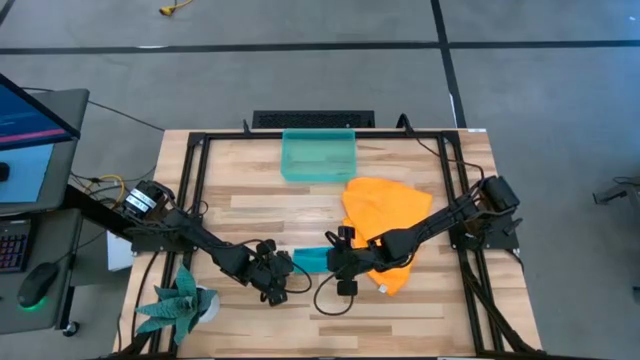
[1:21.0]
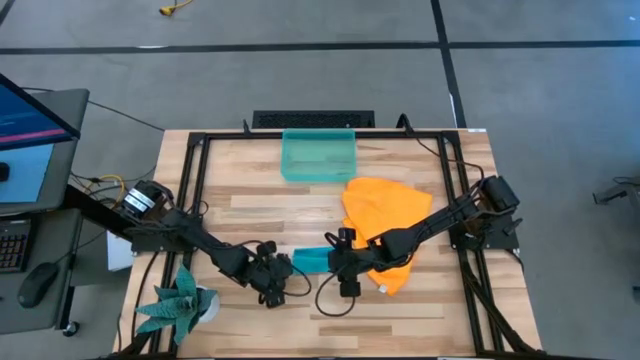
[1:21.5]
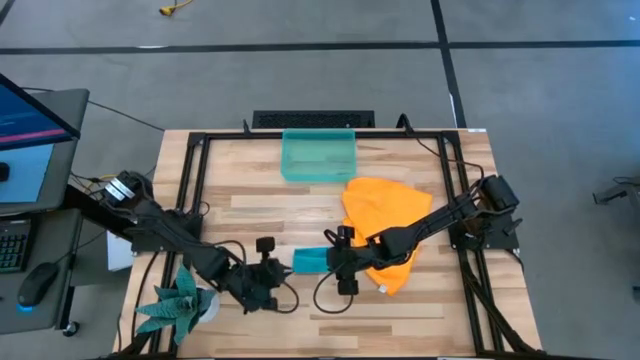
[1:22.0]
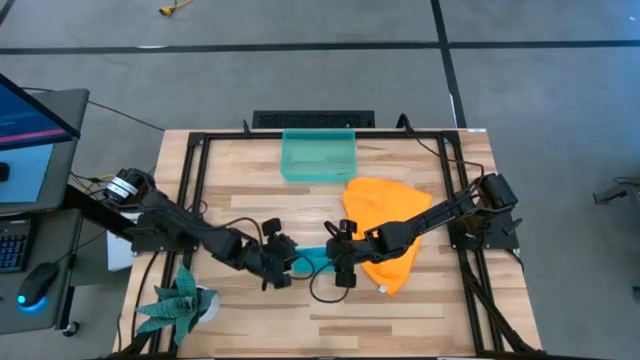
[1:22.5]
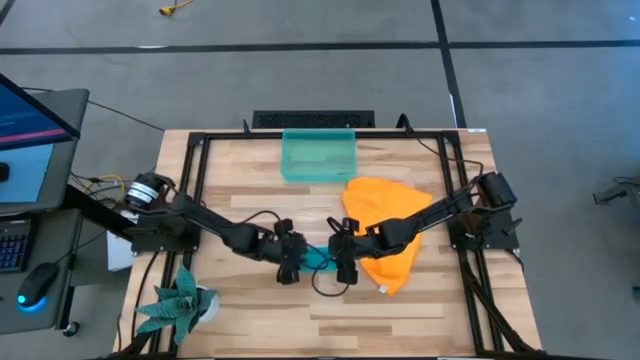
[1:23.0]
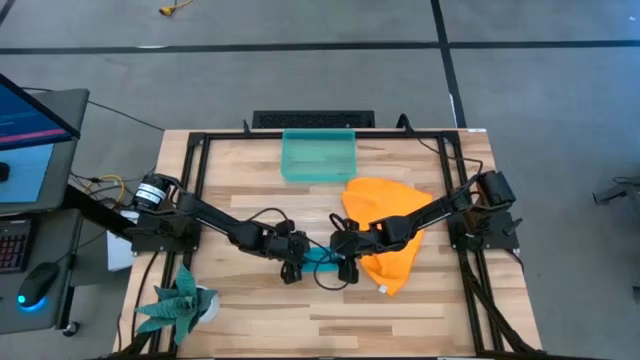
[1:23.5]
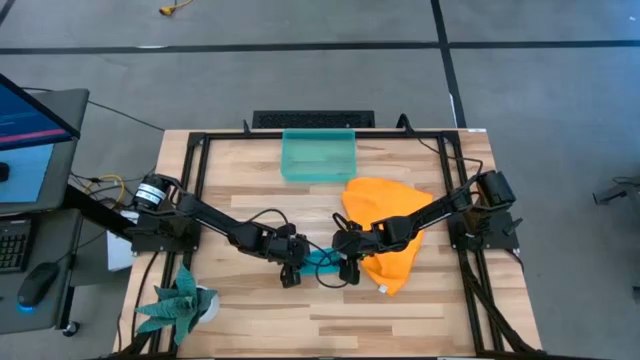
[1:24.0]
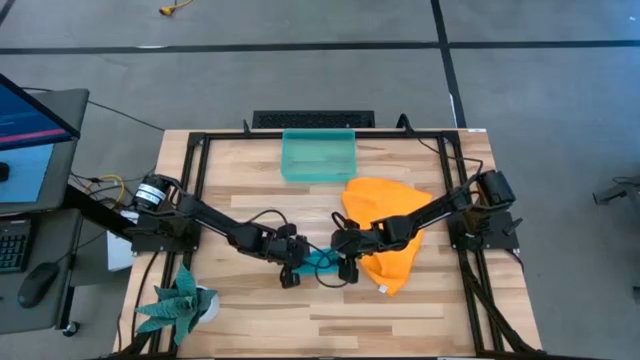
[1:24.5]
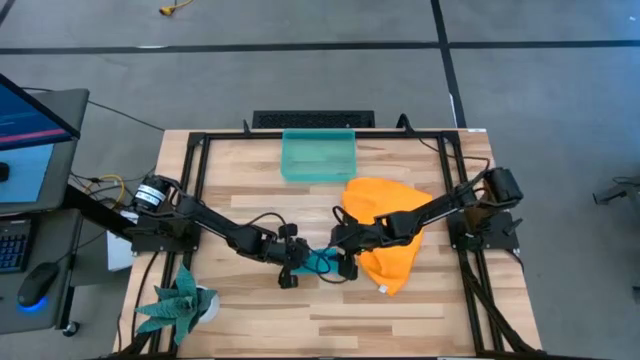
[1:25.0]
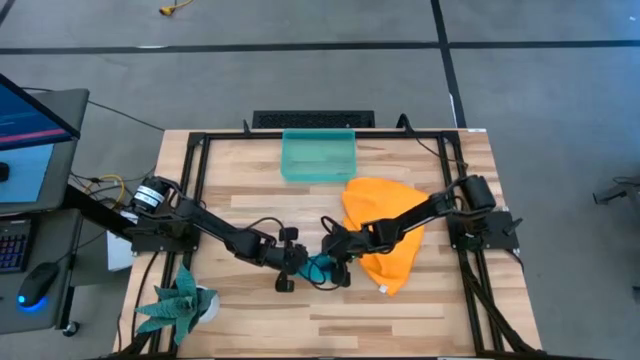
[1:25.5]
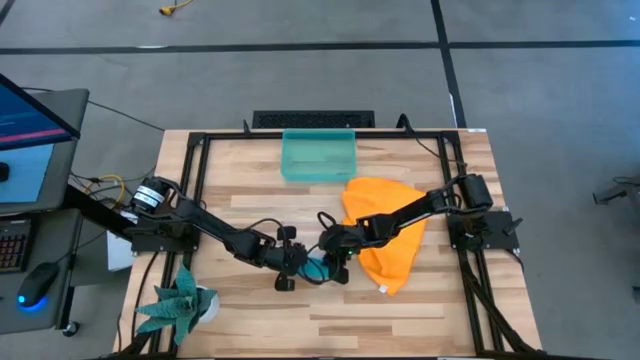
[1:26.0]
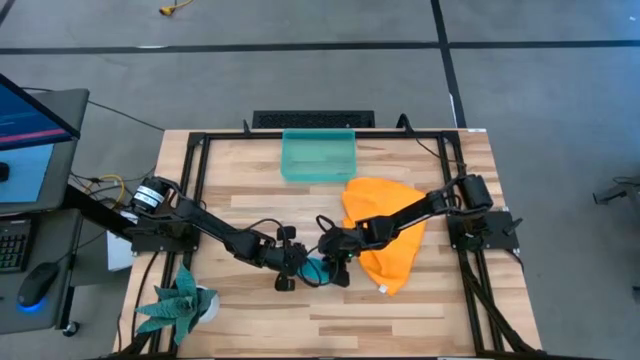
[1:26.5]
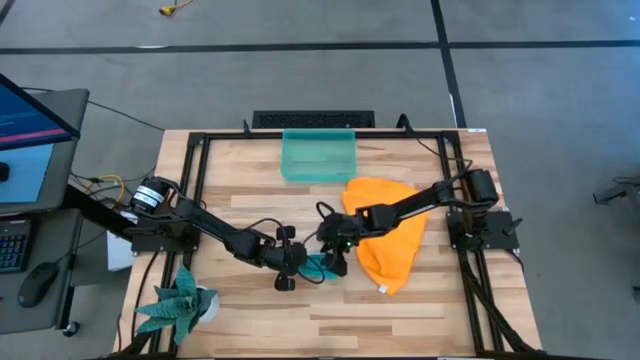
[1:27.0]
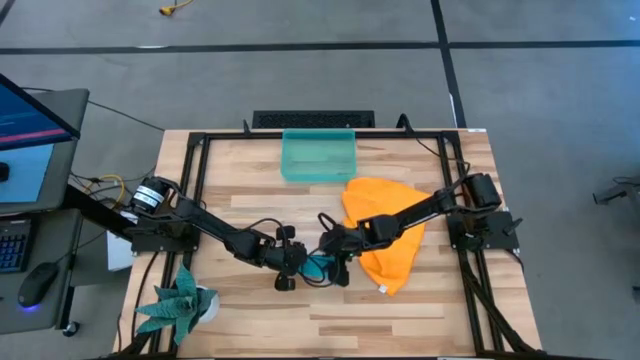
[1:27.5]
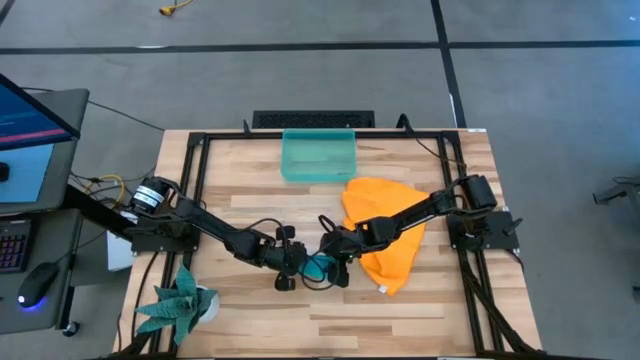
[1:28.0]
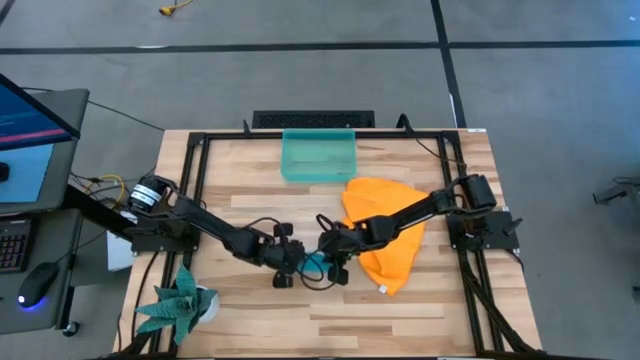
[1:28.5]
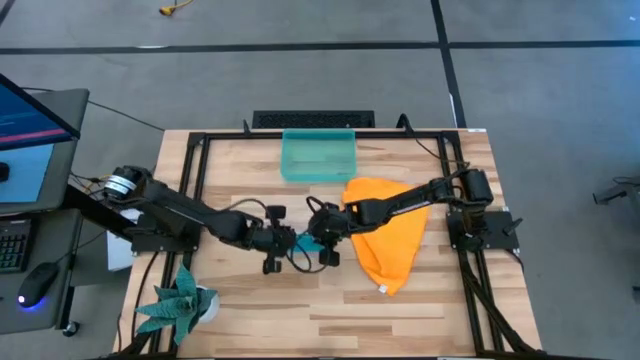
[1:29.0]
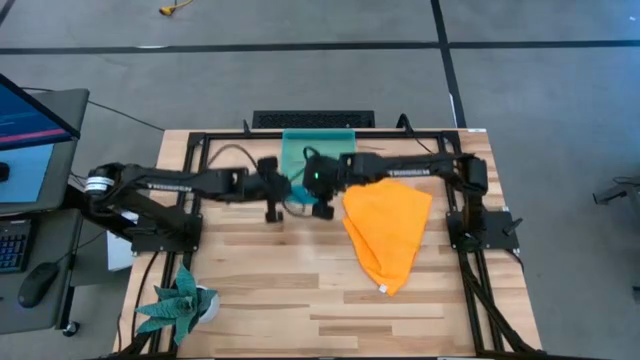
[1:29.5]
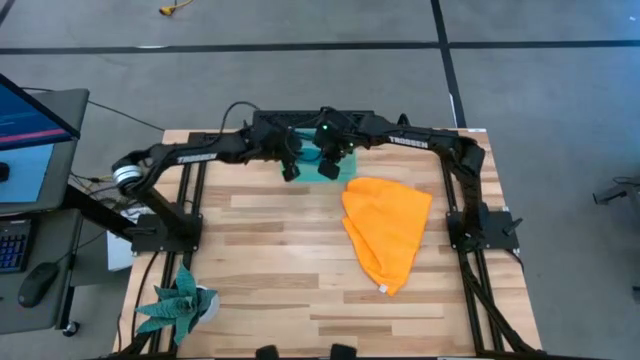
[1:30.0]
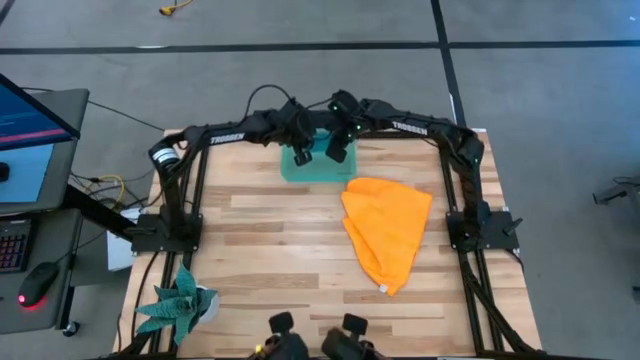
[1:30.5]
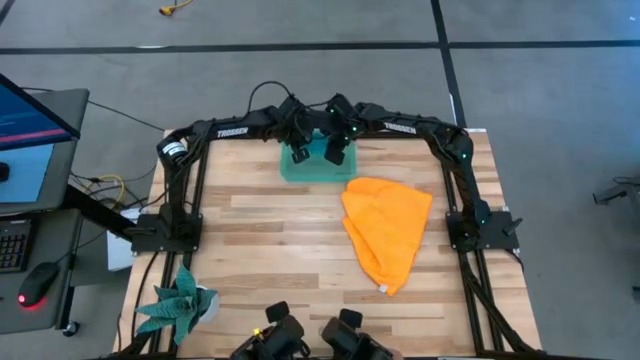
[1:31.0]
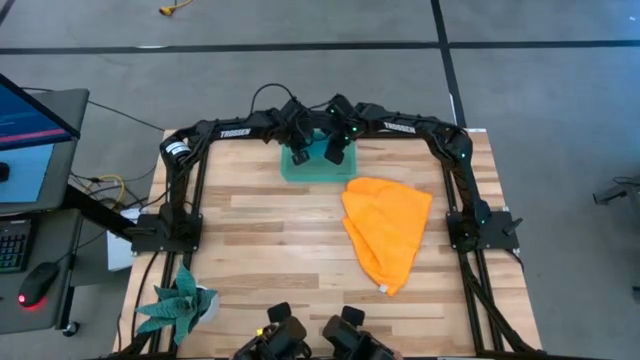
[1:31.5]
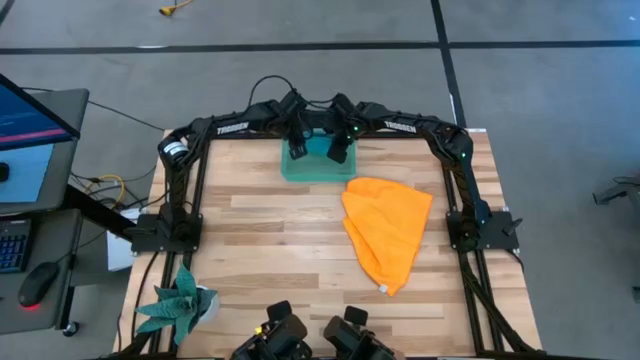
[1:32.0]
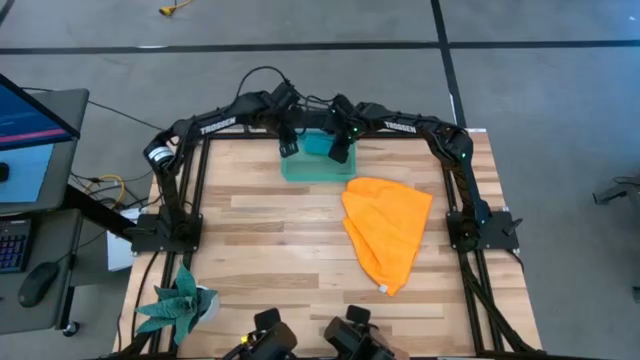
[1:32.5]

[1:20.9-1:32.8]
Task: Roll microfiber towels into tight, uniform cylinder then place into a basket
Put the rolled microfiber cloth into the blue bin

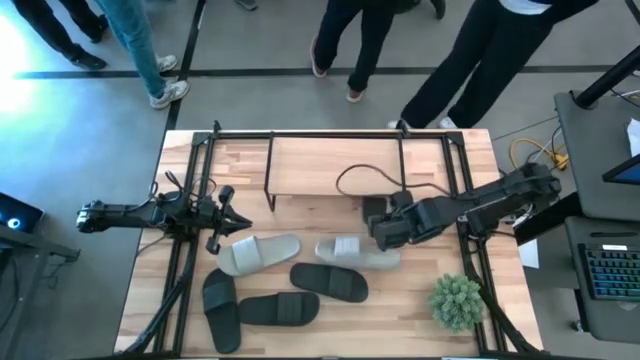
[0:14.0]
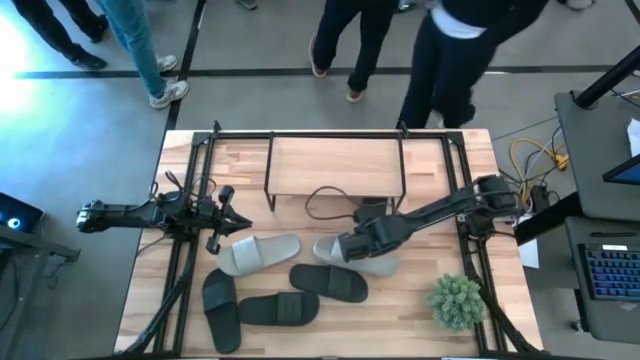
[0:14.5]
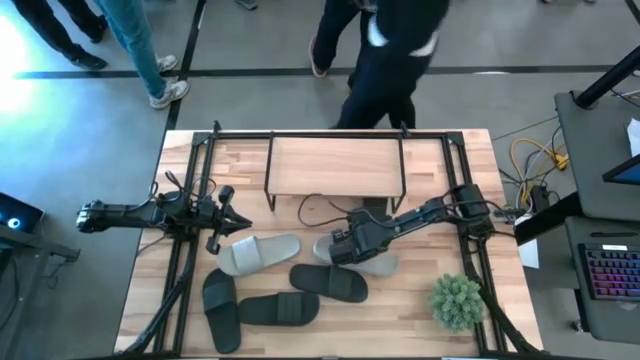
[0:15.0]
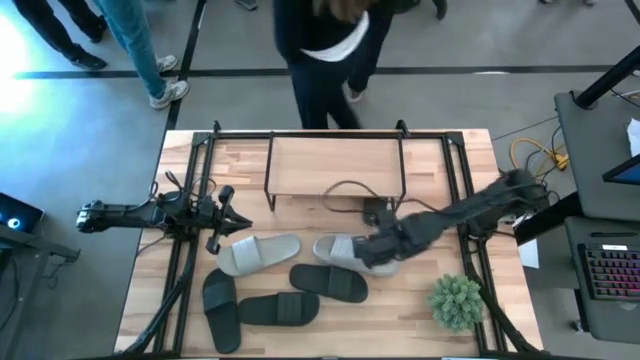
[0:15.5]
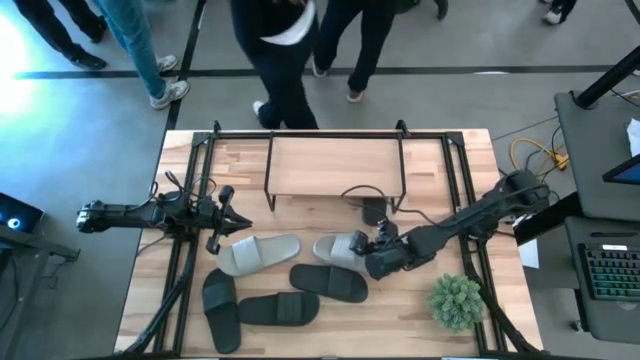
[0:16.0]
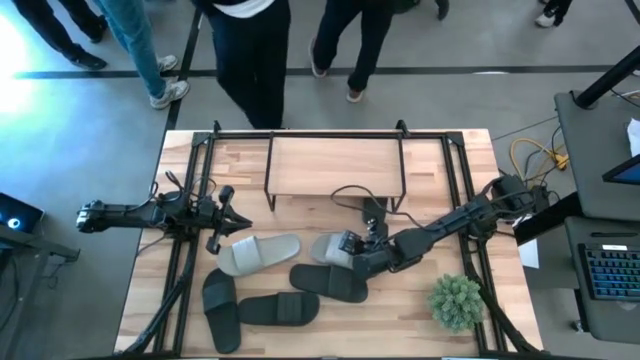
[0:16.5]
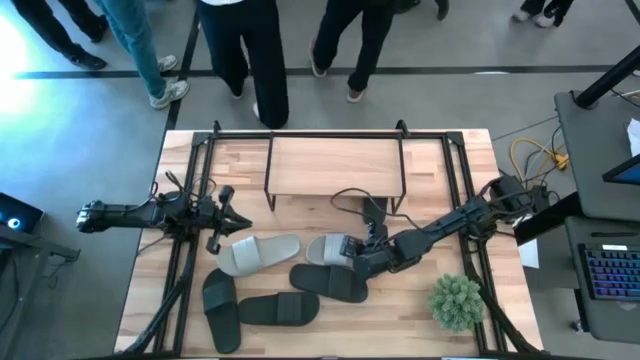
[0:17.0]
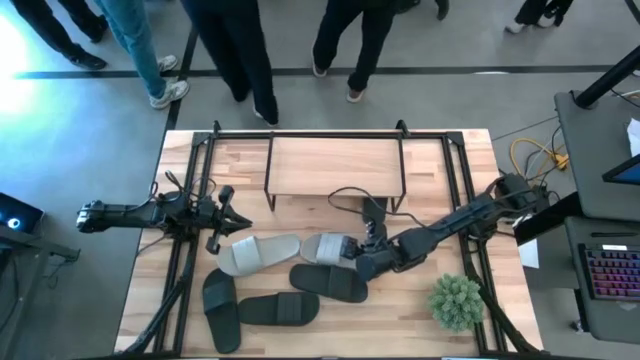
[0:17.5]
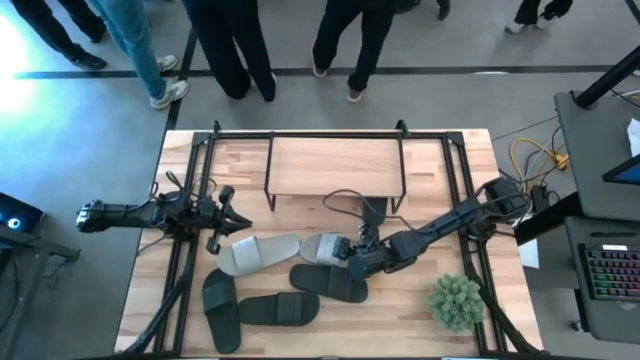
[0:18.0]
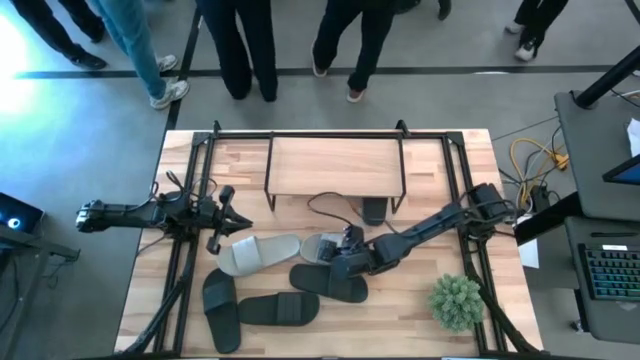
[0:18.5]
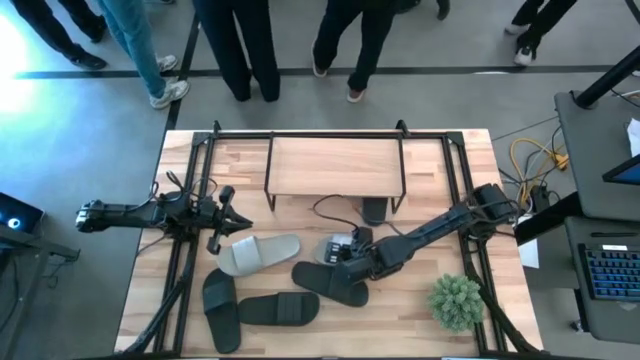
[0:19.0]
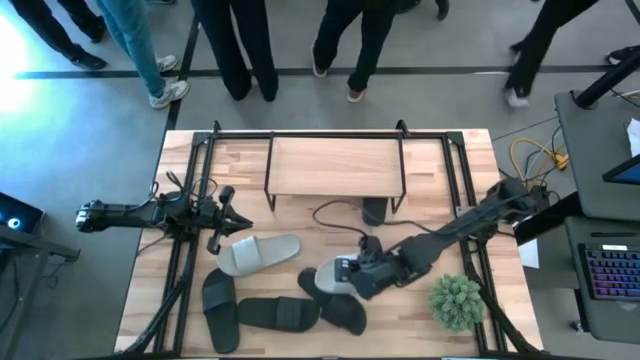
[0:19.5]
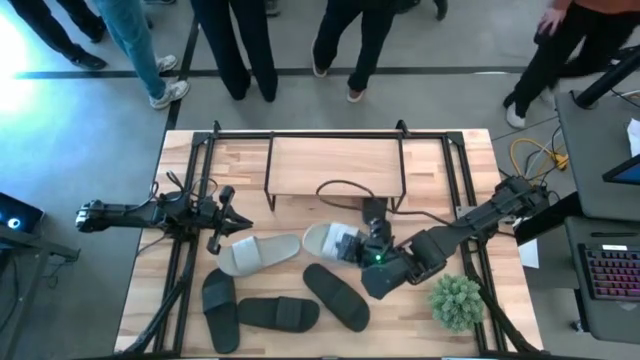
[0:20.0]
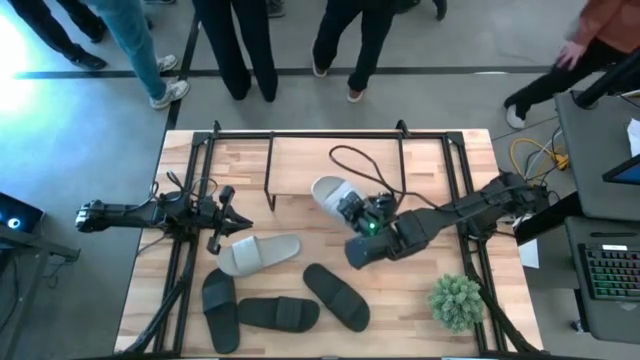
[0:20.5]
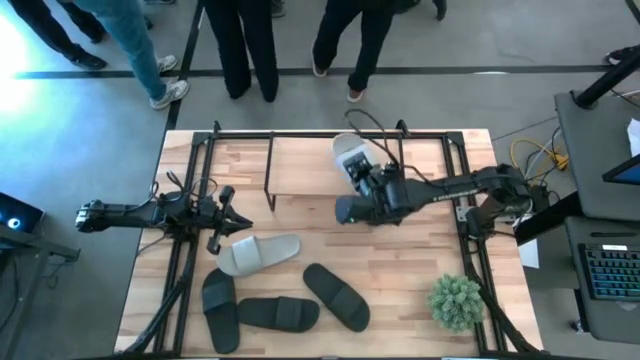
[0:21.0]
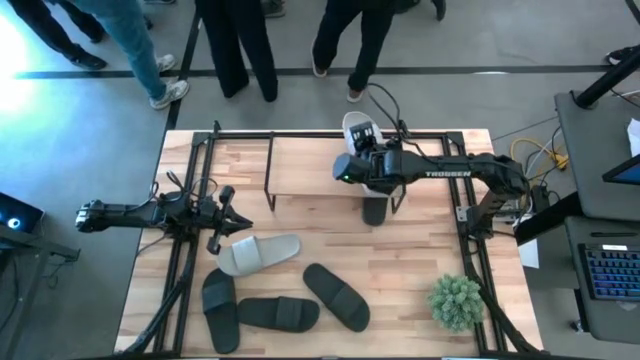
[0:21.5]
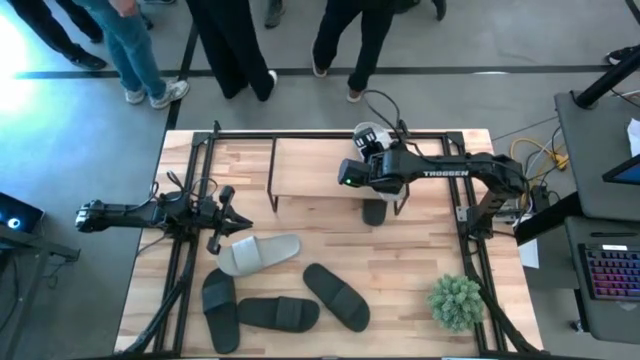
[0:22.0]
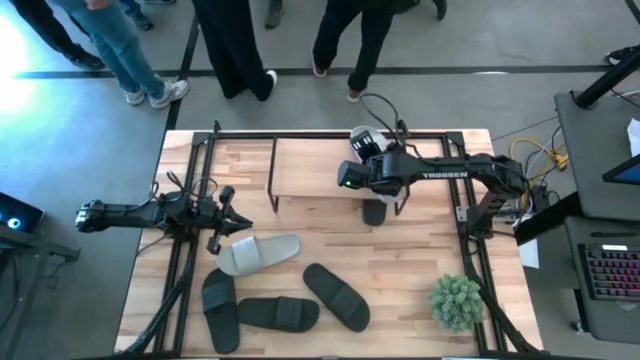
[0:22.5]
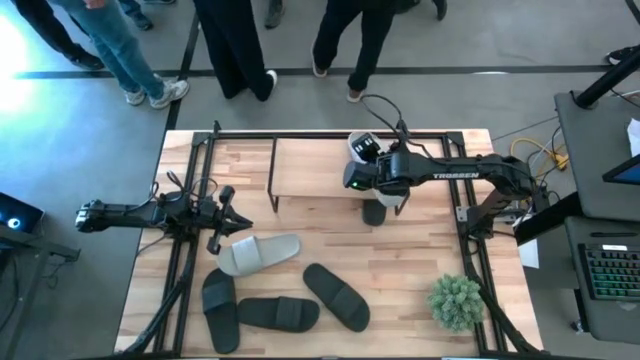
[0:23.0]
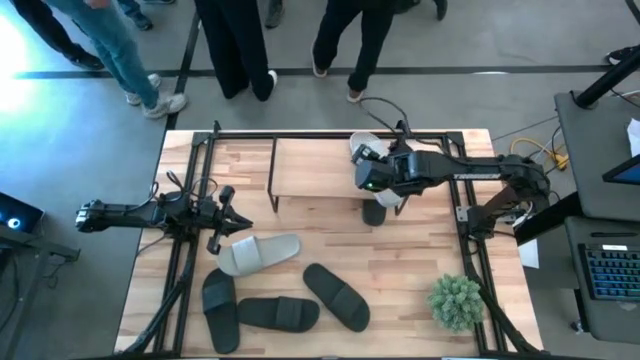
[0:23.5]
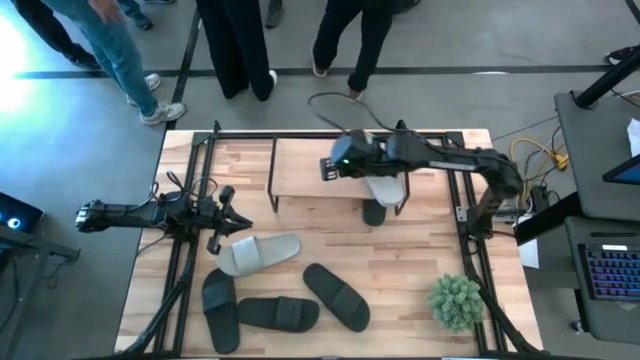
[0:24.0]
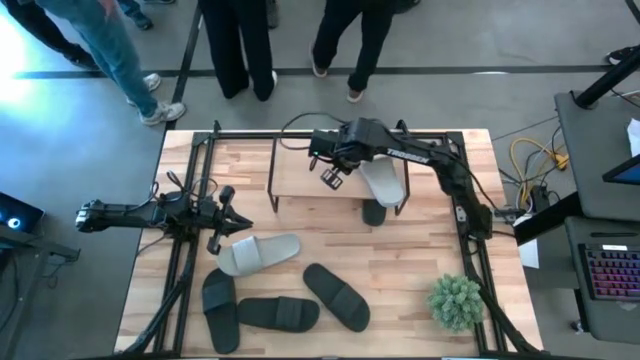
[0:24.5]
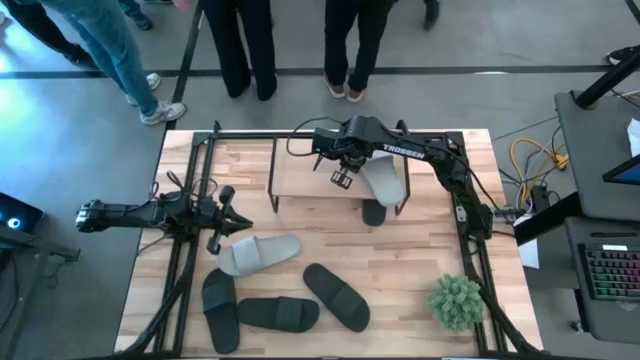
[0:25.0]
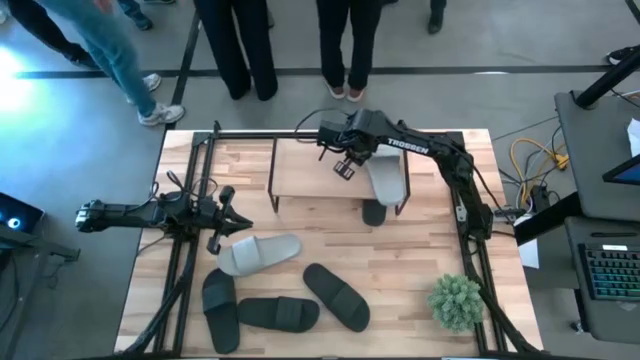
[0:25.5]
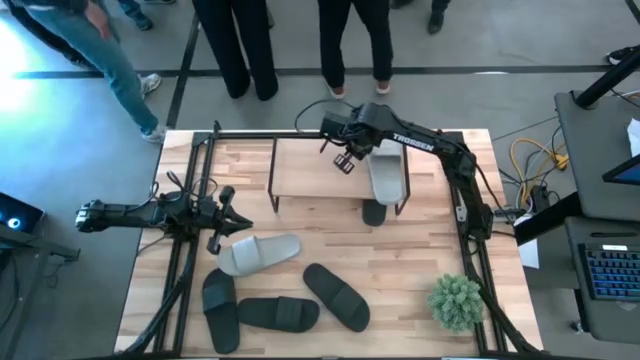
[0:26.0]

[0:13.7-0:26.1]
Task: Pick and place slides into the shelf
Put the gray slipper on the shelf
